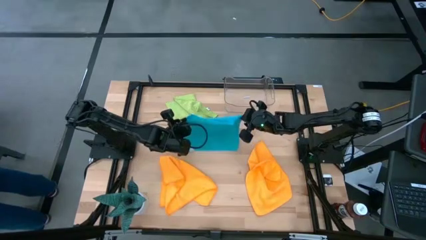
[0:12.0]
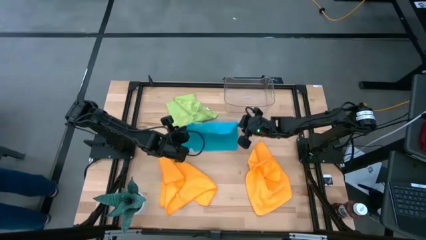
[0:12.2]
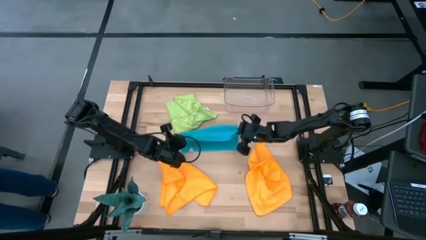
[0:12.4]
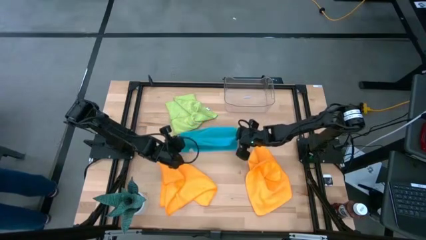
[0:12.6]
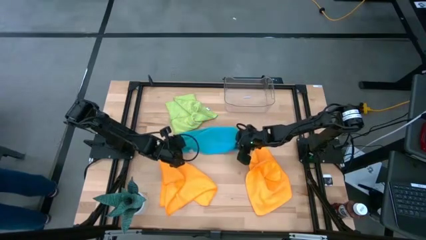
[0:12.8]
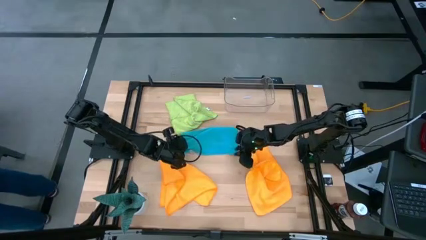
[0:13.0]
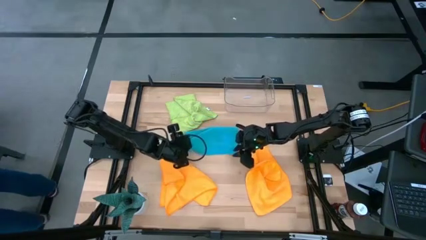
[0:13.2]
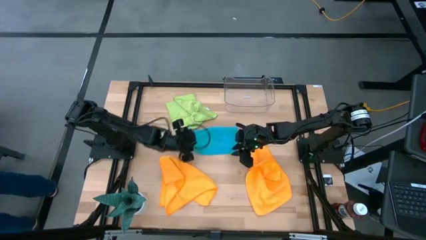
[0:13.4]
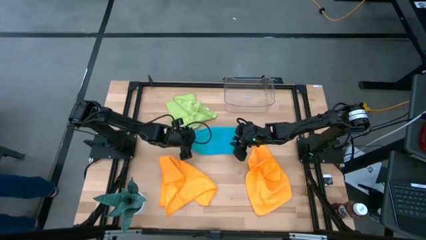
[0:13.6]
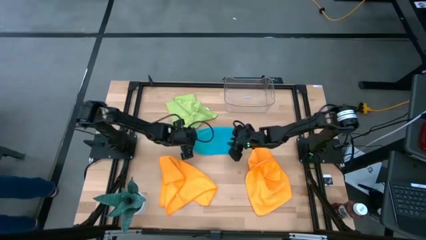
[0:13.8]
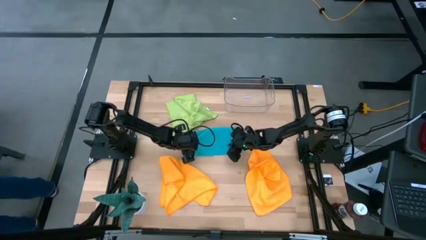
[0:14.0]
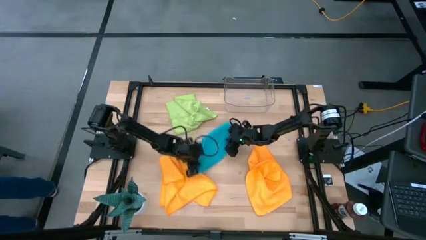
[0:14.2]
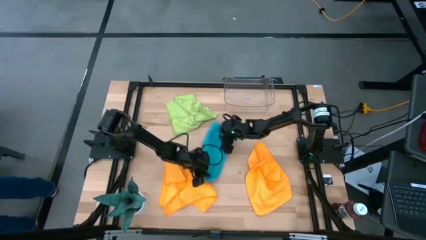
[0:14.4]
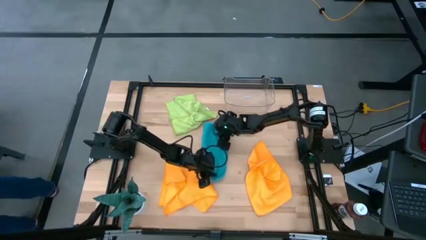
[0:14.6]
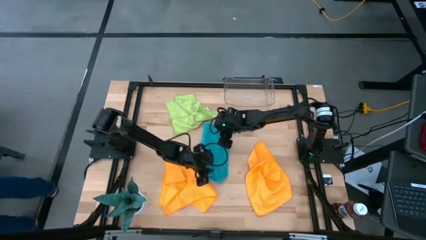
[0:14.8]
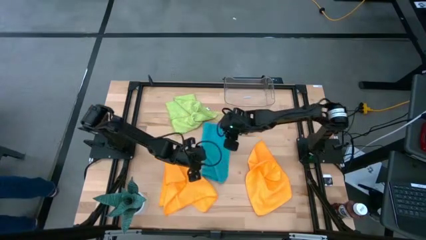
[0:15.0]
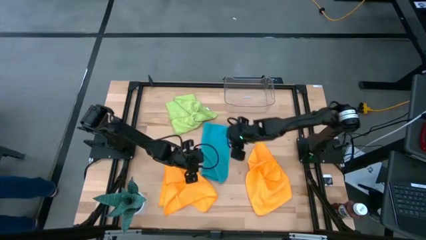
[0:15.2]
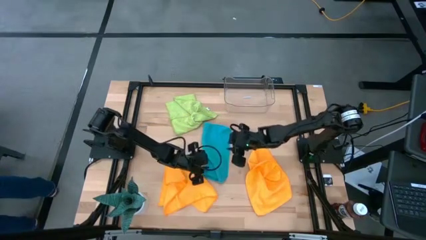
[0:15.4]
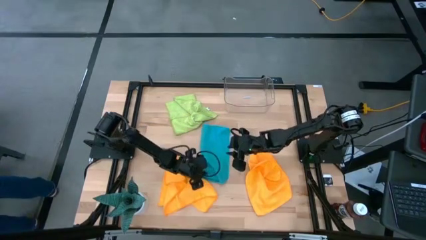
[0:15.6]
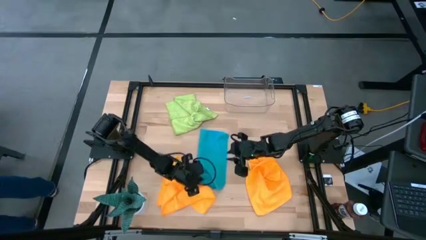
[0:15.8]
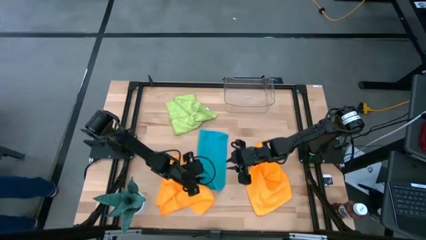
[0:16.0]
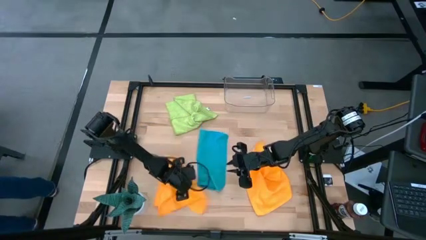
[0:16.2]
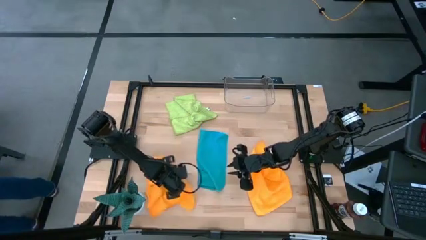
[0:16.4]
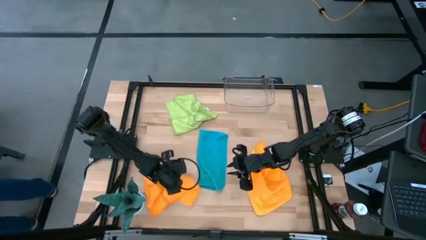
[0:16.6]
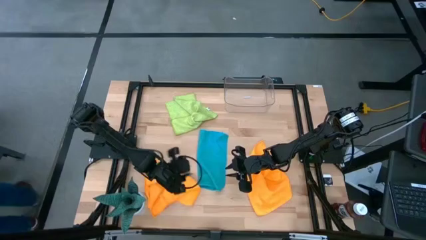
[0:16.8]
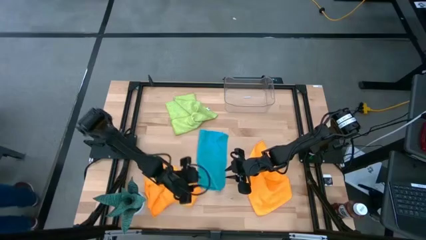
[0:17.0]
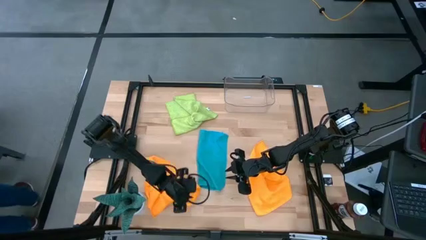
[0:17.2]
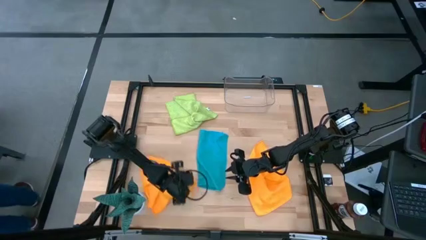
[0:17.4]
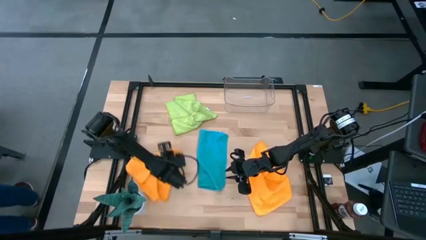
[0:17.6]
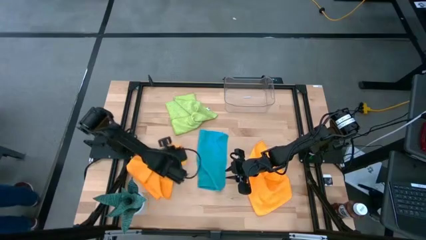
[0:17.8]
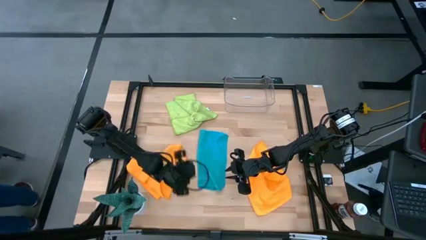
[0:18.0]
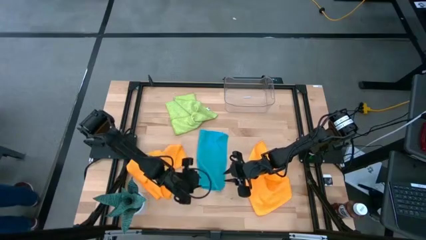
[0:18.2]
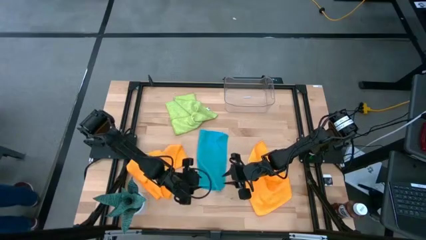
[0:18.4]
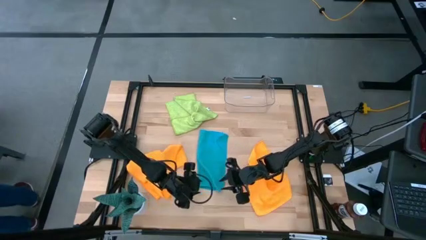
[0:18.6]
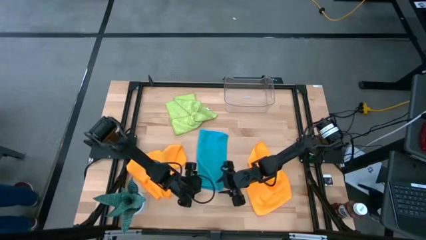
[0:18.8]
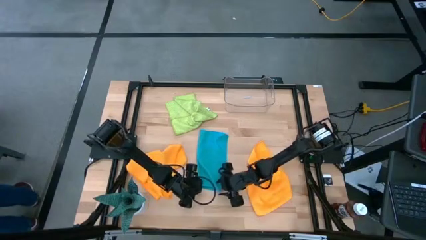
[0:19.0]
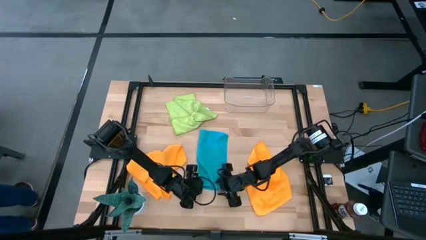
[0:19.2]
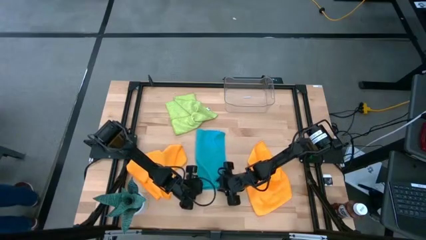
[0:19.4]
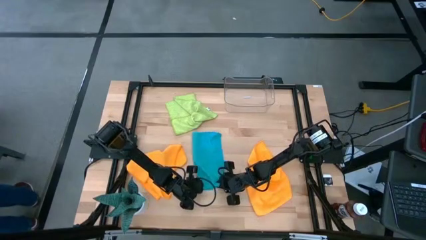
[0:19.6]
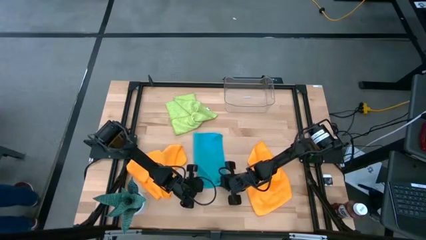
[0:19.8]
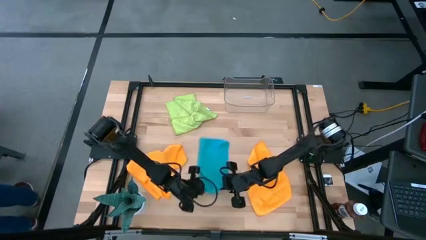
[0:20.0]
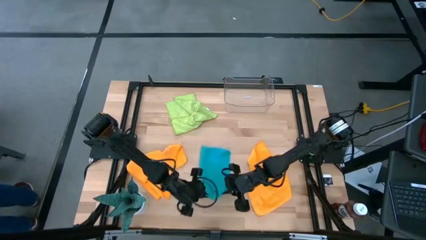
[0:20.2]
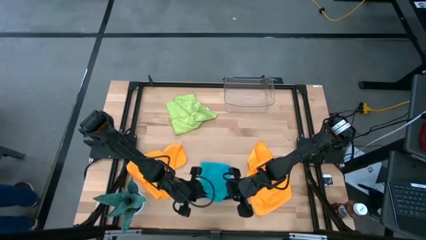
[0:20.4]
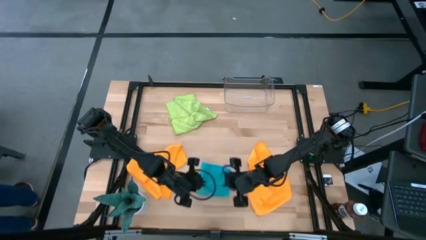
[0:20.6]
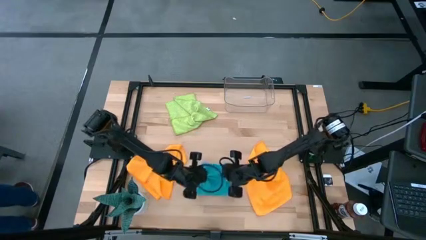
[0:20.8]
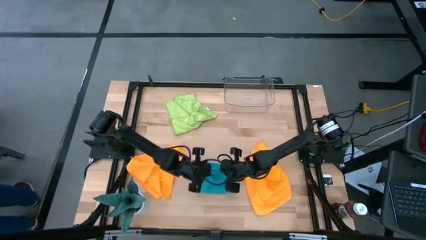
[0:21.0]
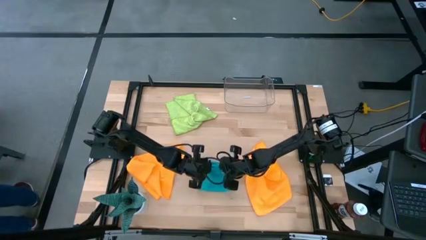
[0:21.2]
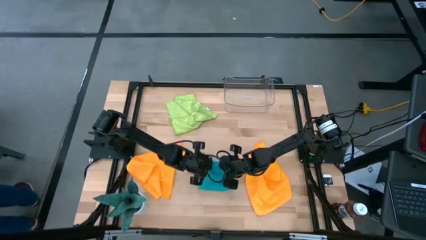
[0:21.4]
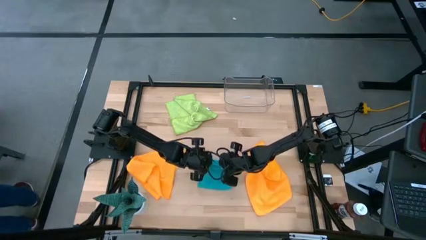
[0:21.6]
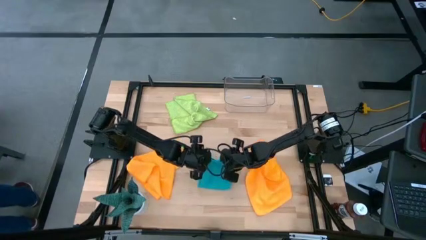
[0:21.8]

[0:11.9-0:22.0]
Task: Fold microfiber towels
Fold the blue microfiber cloth

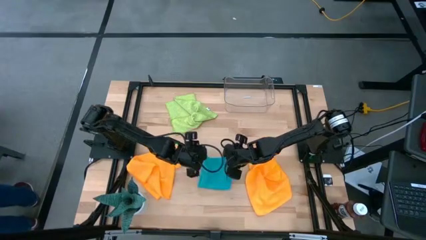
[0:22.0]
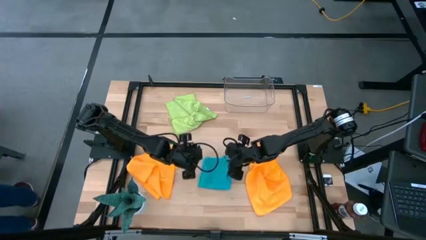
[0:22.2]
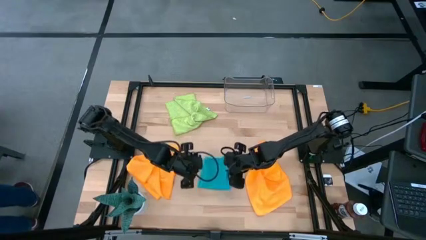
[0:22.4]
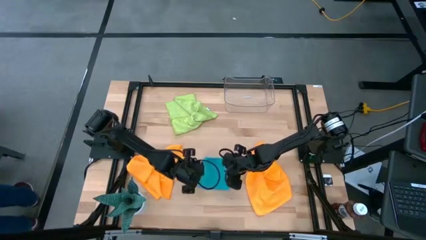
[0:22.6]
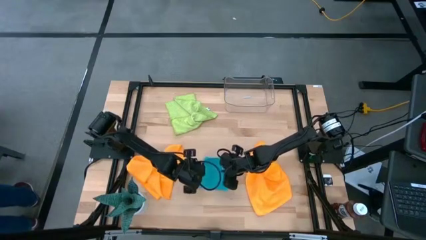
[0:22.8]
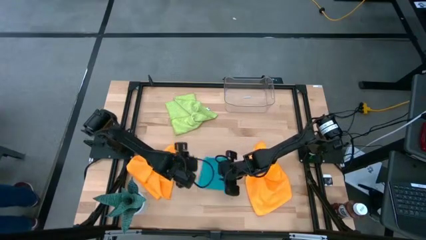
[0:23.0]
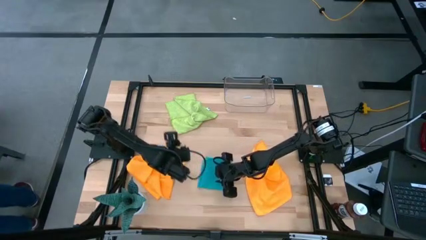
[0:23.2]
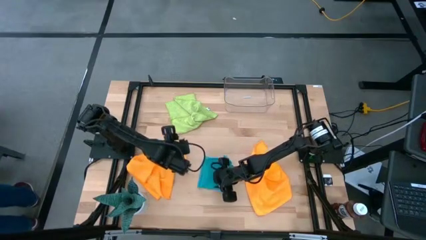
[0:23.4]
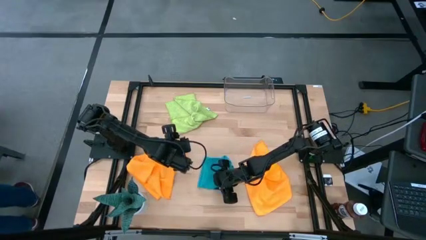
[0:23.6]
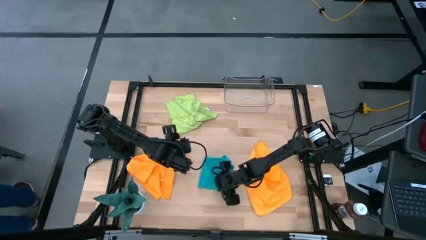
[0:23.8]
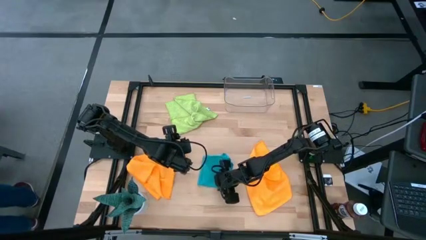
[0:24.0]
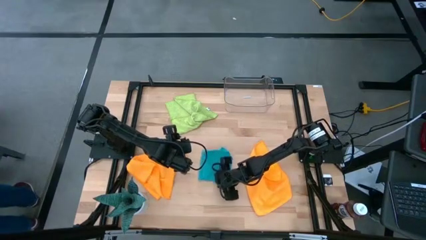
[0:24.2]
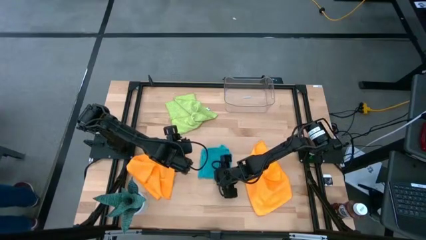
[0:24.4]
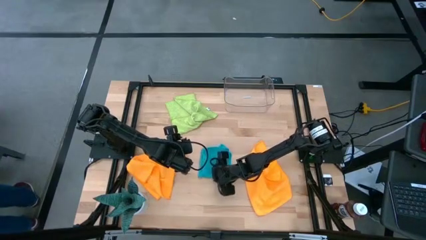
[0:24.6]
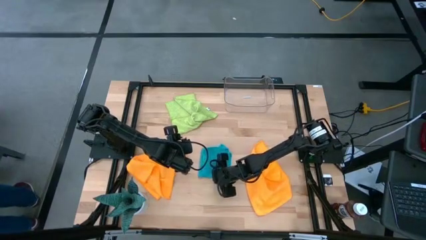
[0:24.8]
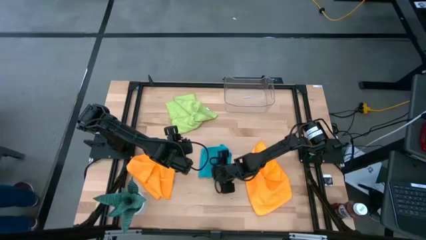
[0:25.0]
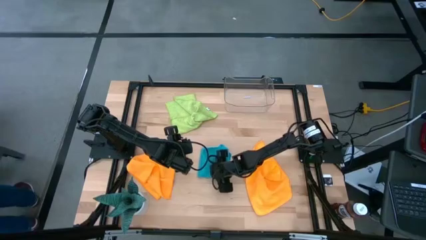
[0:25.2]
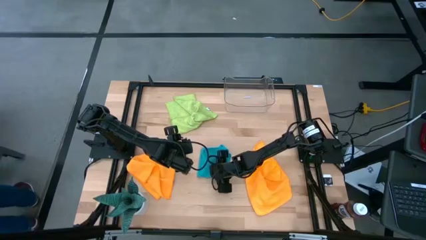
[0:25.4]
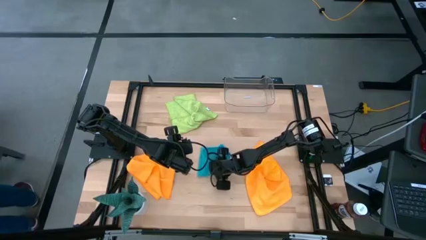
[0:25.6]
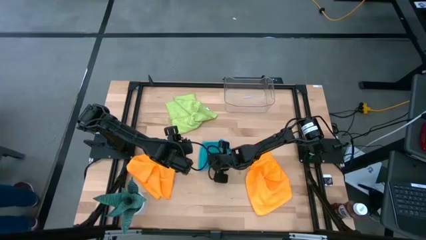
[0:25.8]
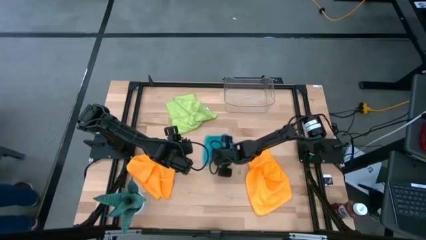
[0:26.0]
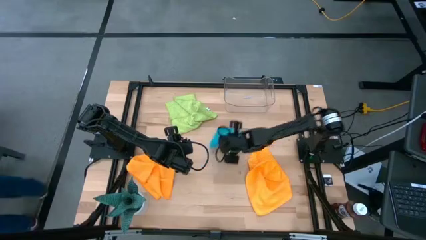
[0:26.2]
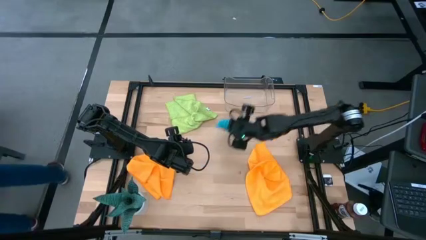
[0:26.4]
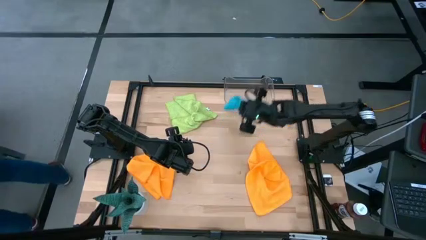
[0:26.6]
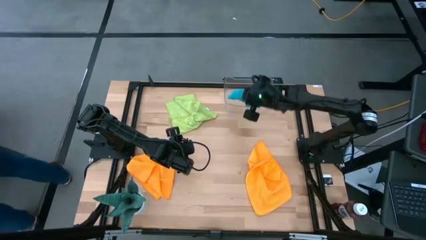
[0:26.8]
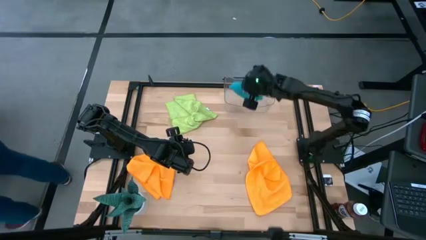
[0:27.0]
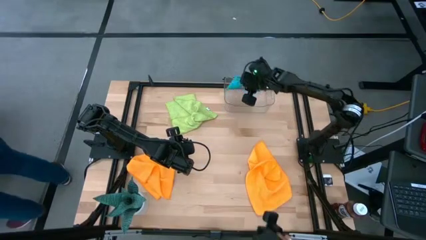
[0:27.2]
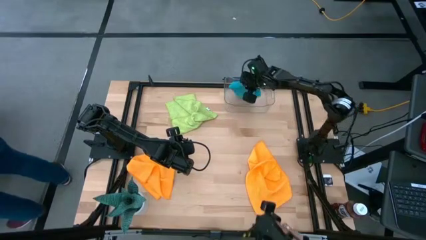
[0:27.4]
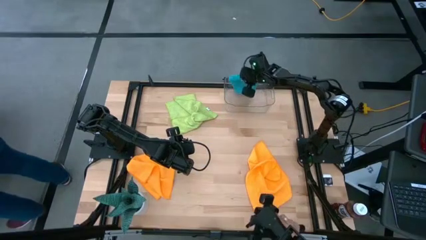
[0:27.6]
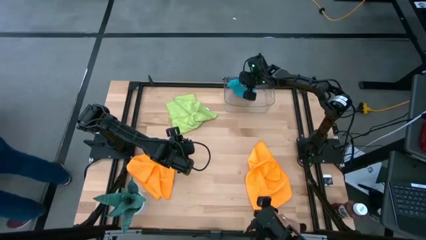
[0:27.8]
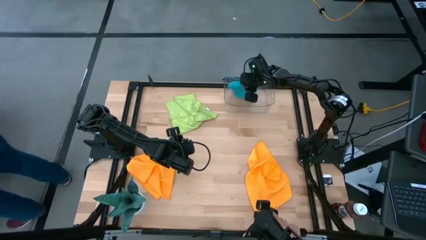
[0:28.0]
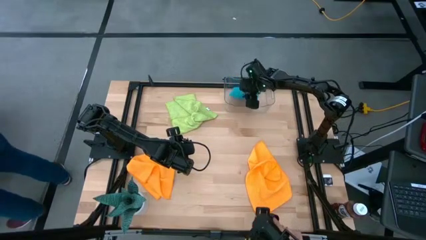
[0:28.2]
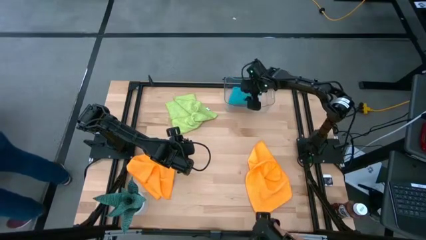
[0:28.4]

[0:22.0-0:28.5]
Put the folded blue microfiber cloth into the transparent bin
